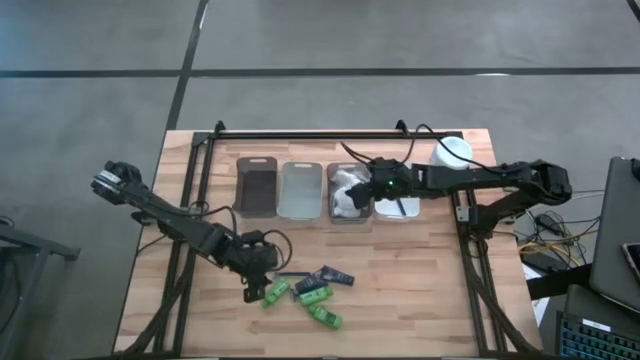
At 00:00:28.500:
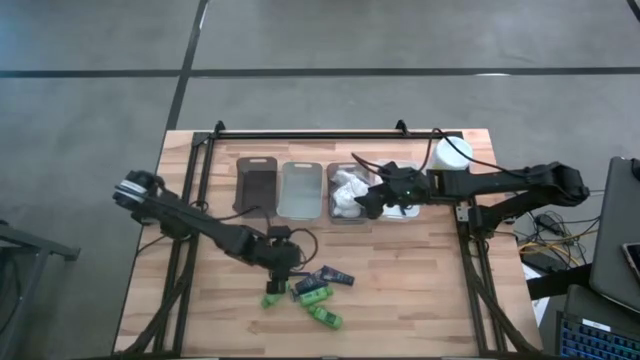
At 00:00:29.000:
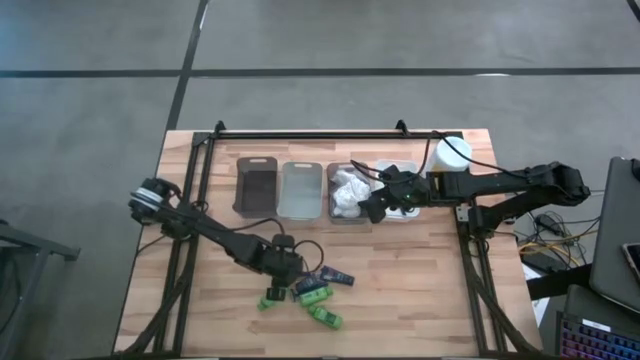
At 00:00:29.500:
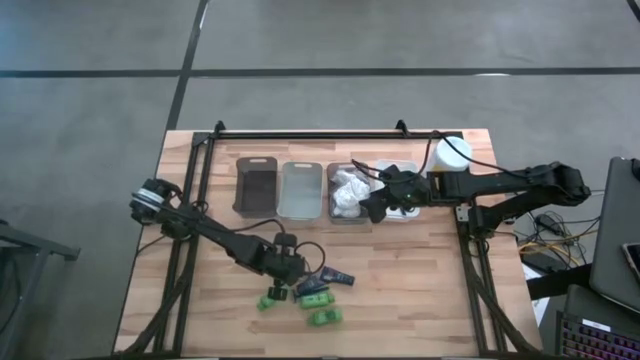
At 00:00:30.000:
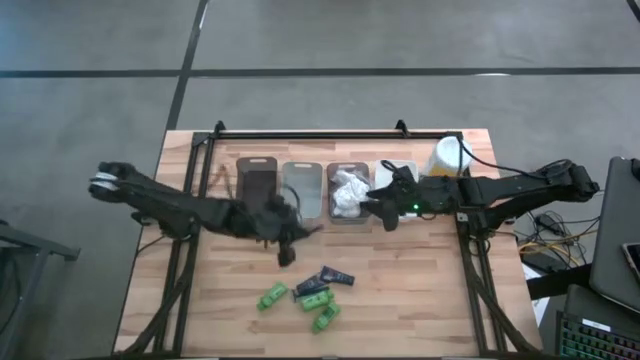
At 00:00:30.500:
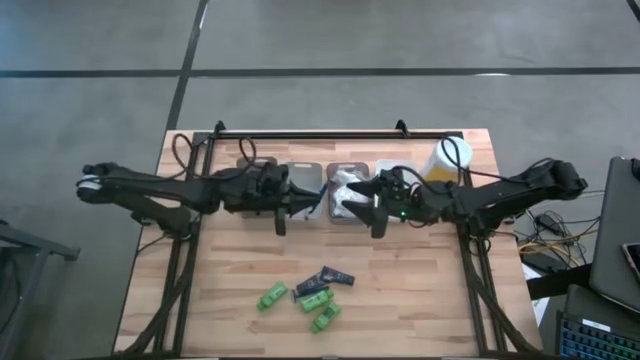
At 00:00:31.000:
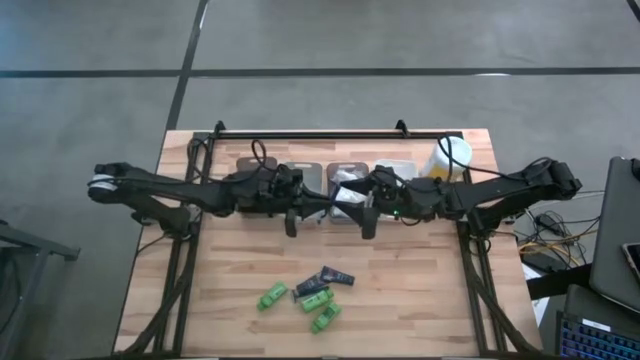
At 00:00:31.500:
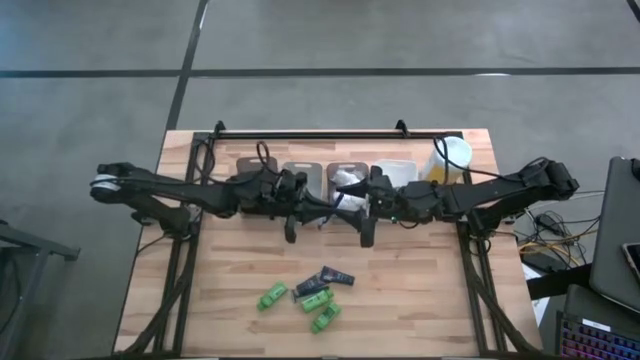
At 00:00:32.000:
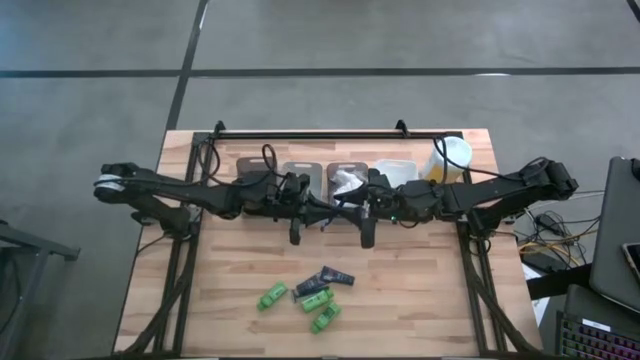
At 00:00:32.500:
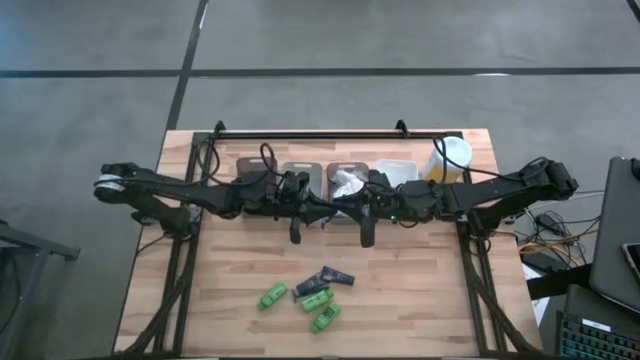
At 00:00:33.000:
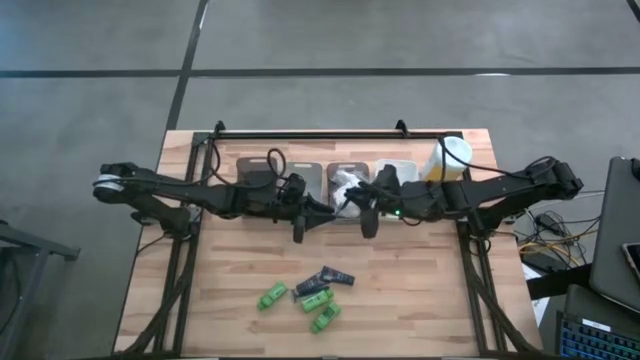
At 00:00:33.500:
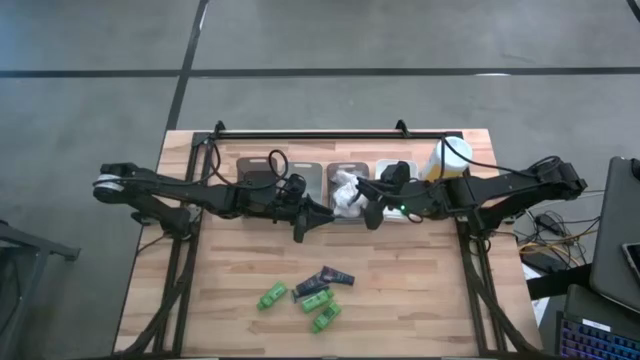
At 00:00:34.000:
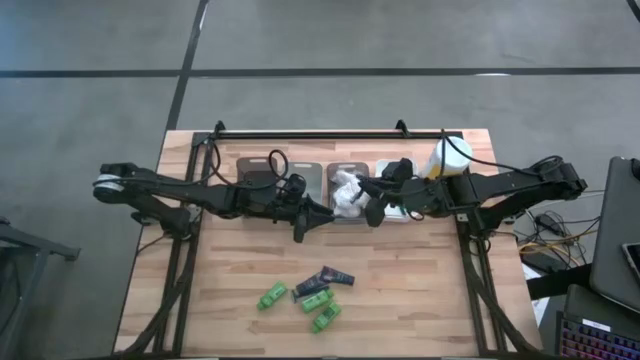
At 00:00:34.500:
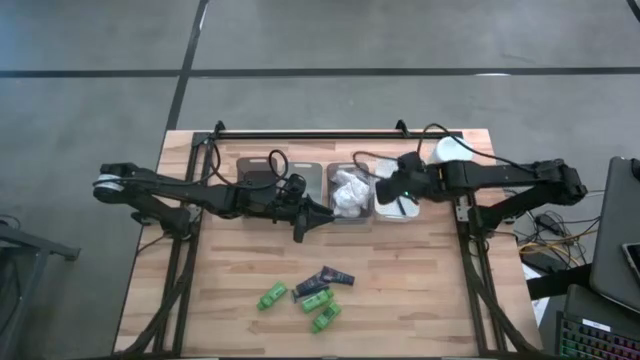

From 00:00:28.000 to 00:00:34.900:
Task: Pick & Place Travel size toiletries
Put the blue razor into the white bin

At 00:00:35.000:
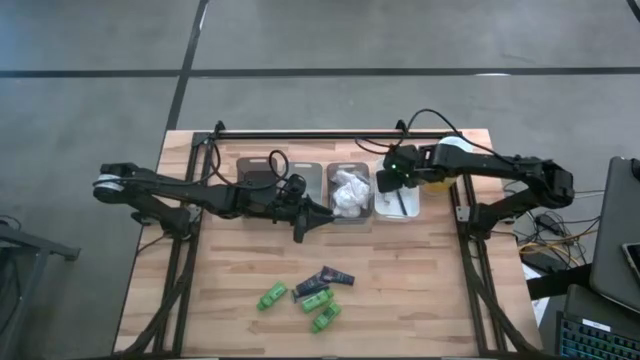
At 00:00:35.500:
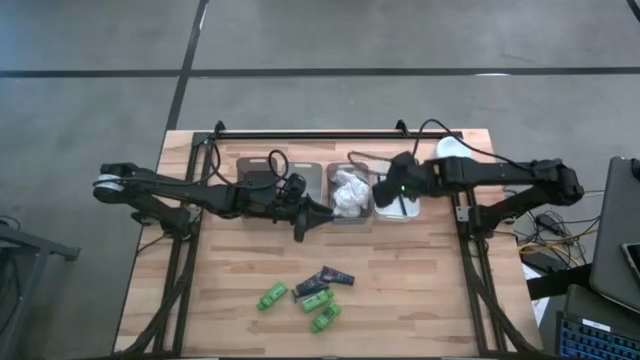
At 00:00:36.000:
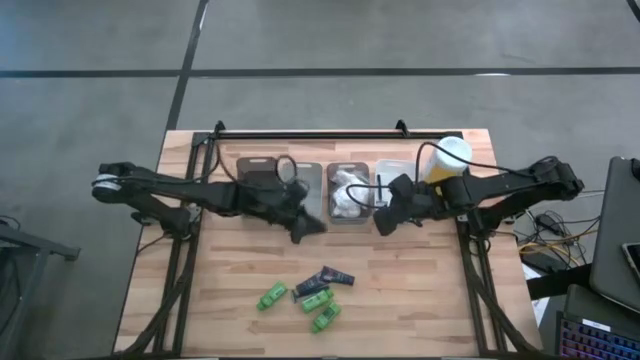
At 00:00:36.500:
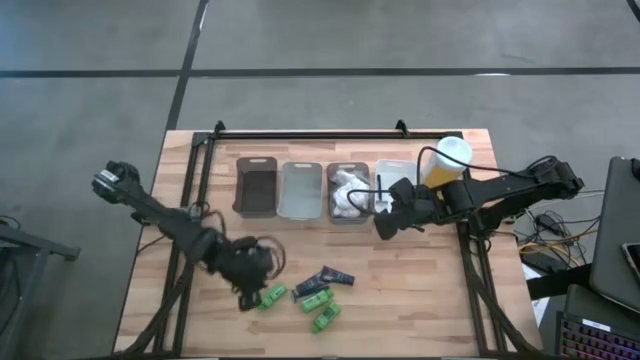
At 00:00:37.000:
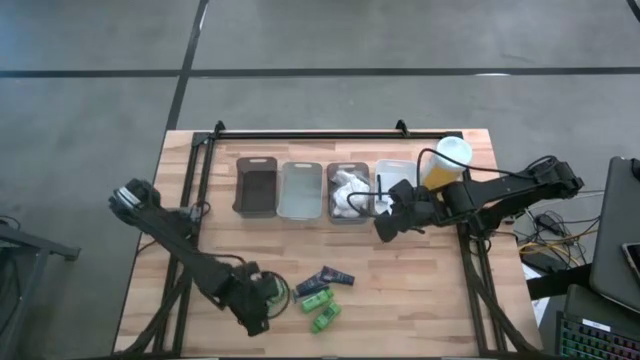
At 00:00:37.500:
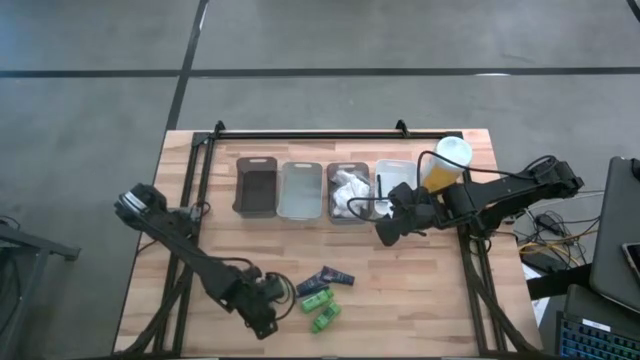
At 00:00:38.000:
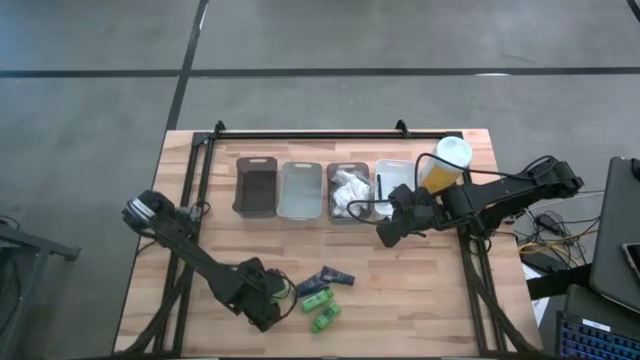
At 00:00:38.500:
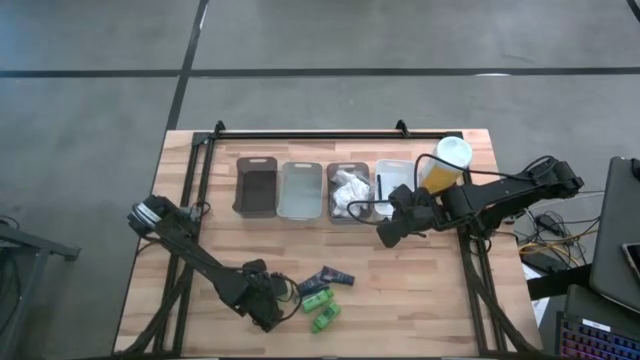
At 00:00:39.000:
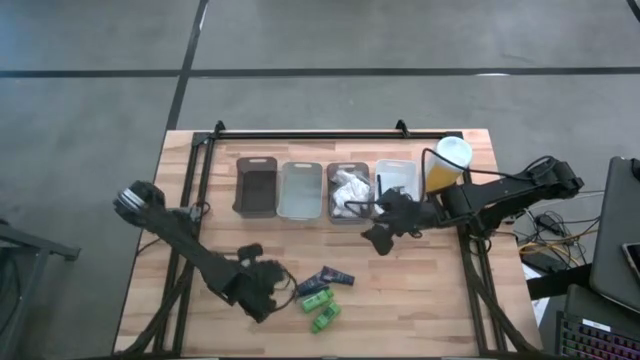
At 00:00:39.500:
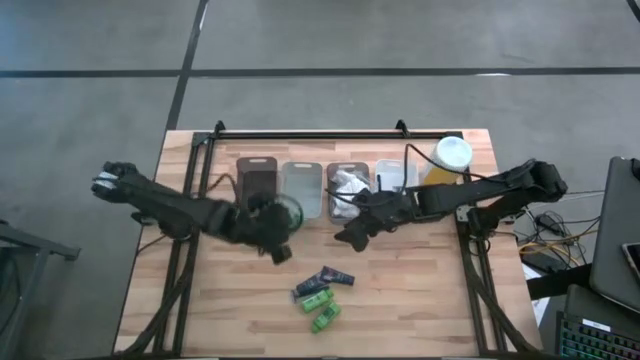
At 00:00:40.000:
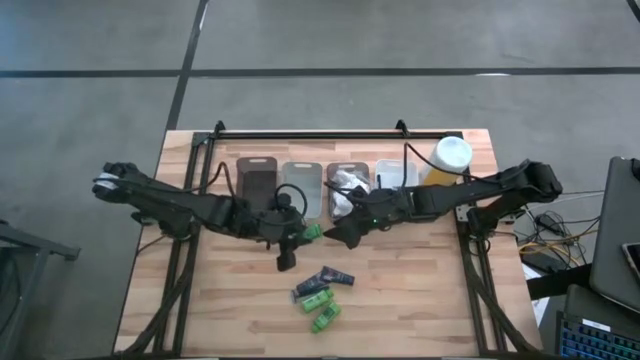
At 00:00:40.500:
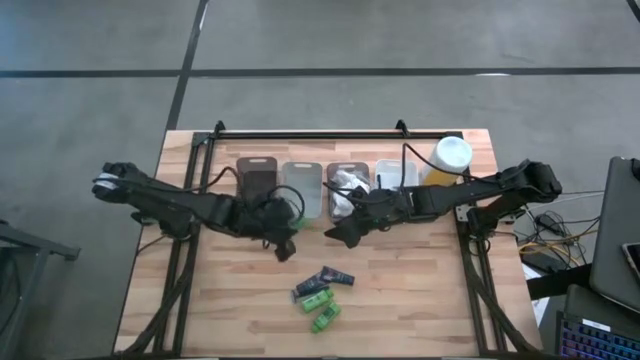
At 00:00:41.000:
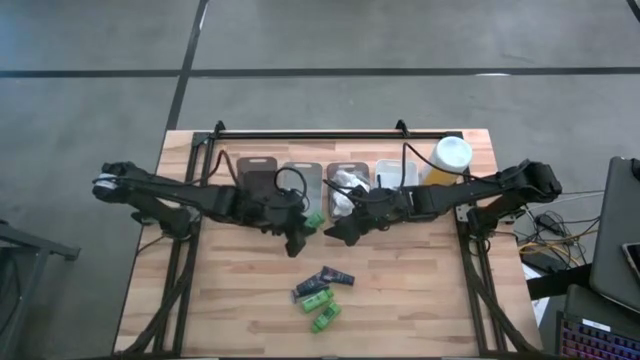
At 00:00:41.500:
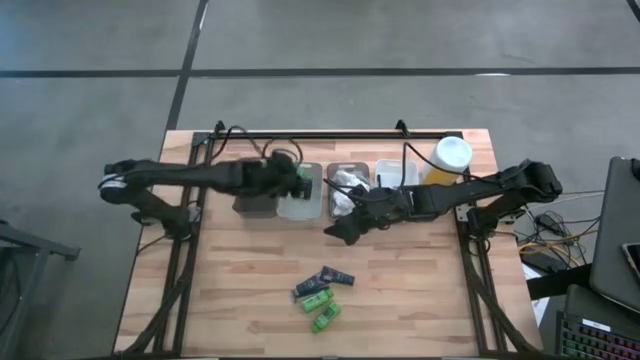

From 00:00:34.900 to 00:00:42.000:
Put the green shampoo into the gray bin

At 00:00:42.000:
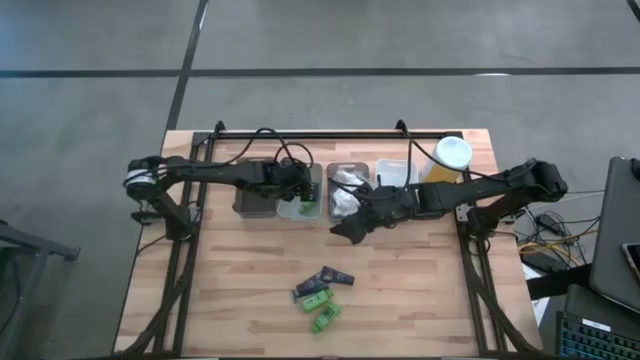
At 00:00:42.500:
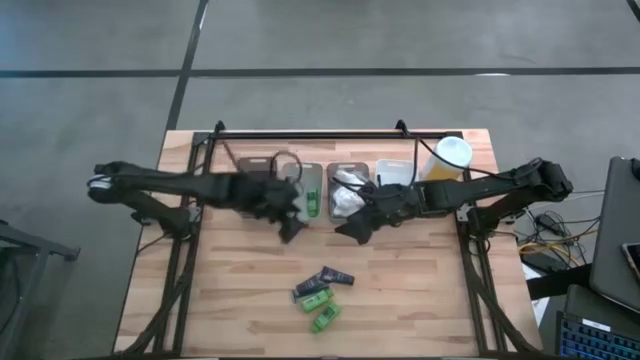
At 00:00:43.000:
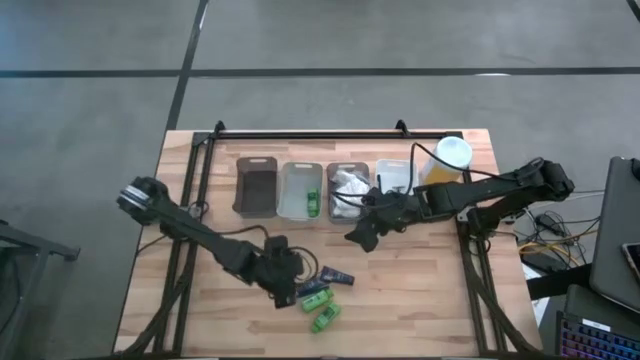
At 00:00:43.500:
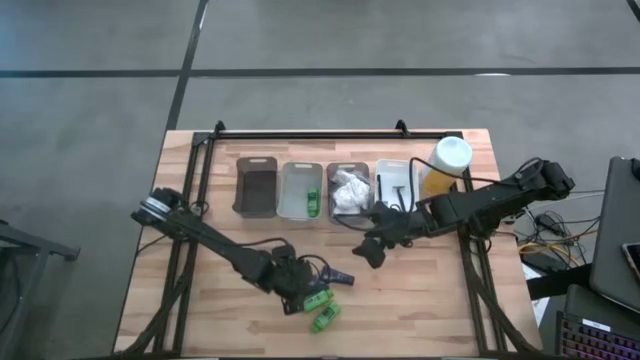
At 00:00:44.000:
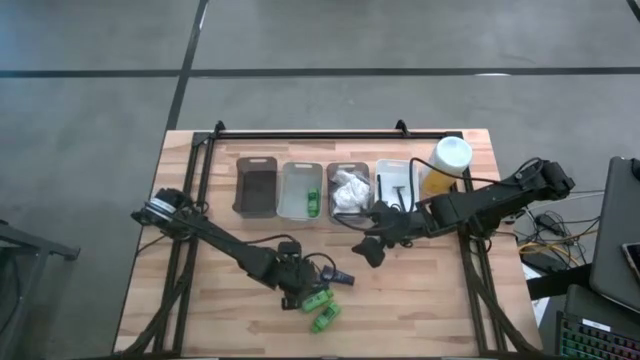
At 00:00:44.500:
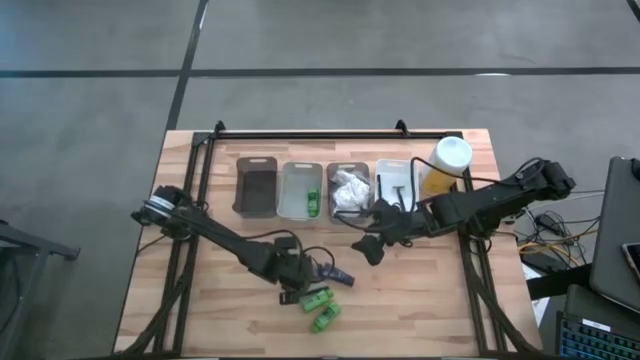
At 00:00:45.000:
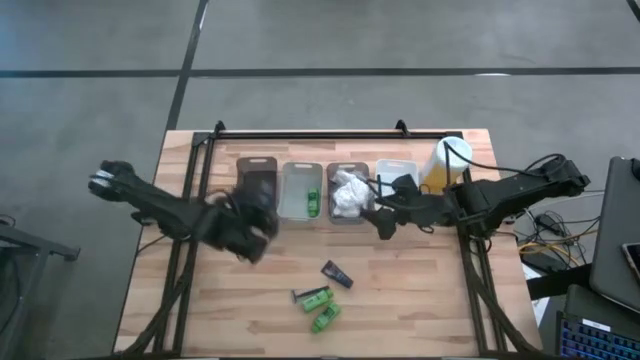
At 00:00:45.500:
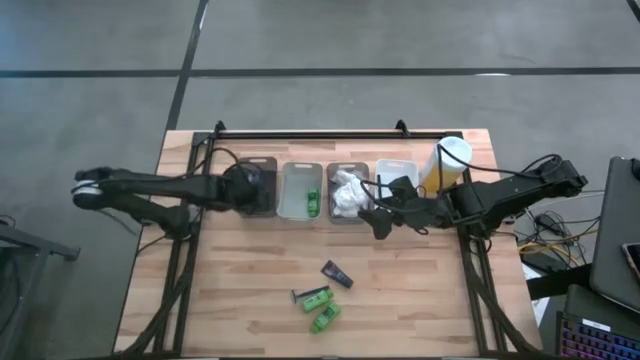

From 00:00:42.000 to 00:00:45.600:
Put the blue shaver cream into the left black bin

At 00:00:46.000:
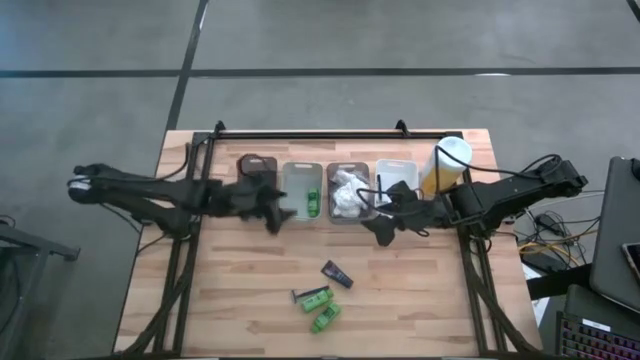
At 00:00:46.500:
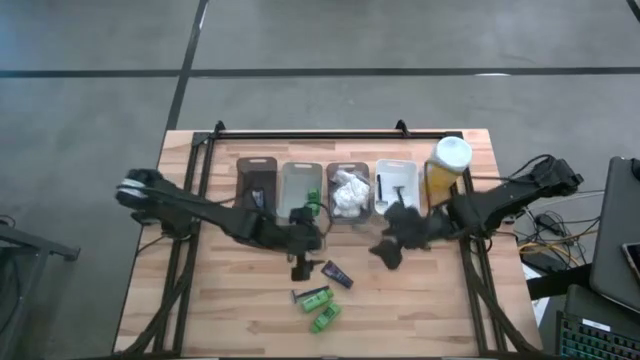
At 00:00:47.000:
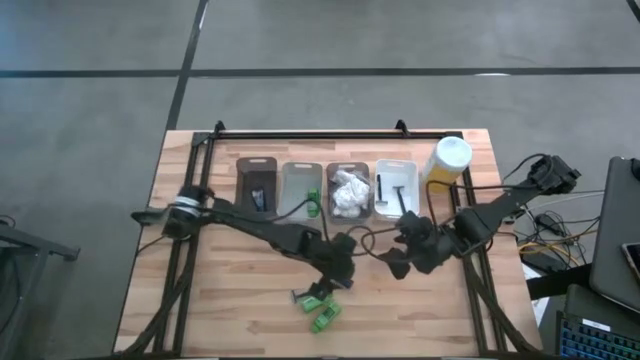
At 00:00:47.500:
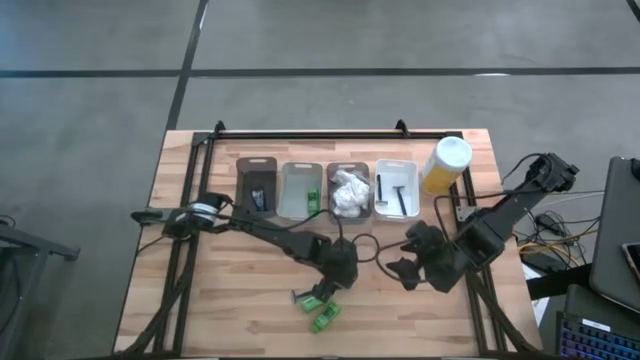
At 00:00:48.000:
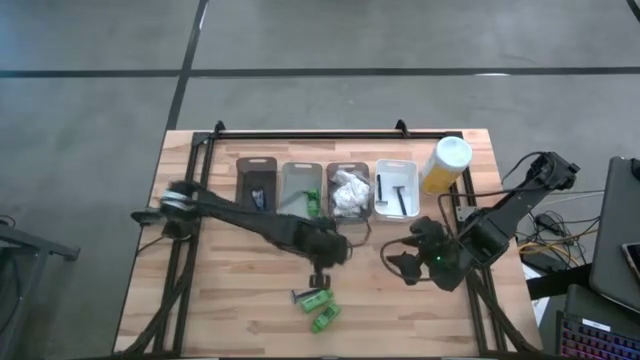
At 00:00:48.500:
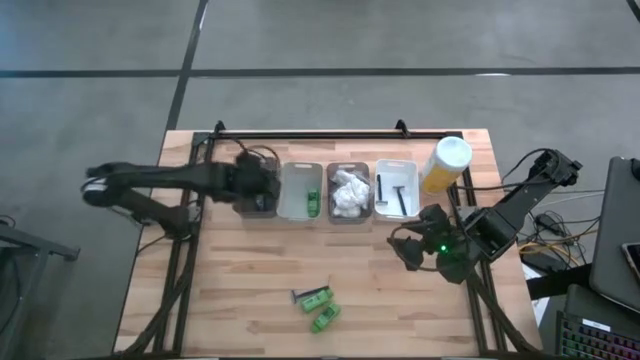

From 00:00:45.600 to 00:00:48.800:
Put the blue shaver cream into the left black bin
